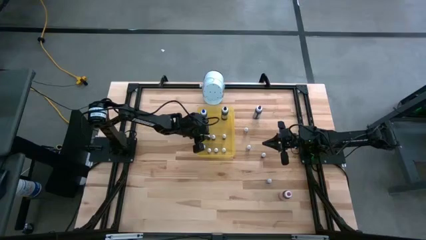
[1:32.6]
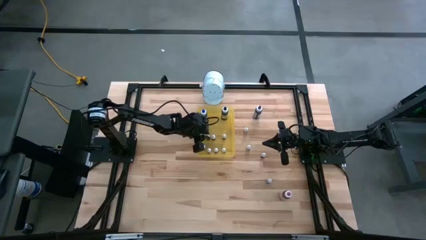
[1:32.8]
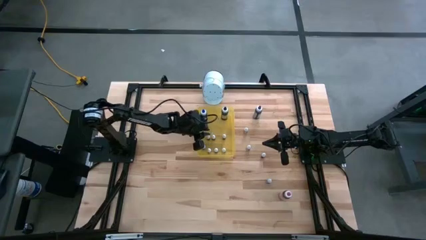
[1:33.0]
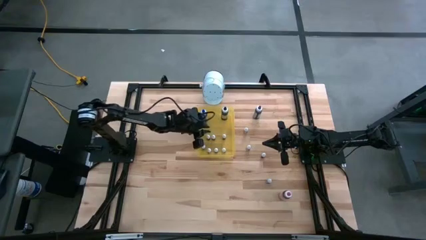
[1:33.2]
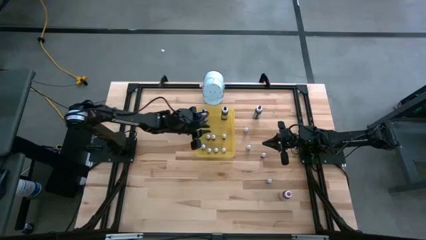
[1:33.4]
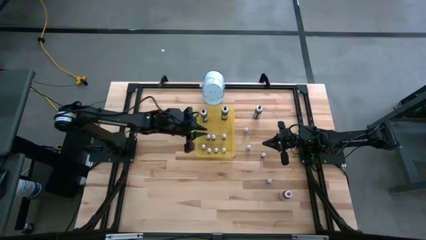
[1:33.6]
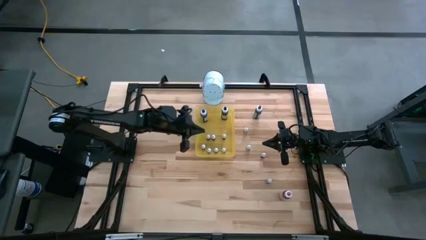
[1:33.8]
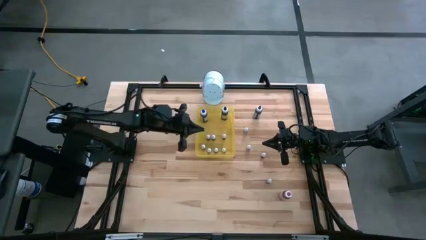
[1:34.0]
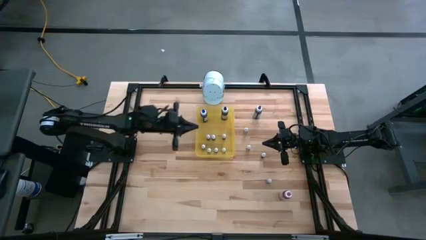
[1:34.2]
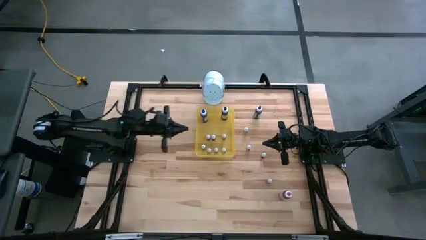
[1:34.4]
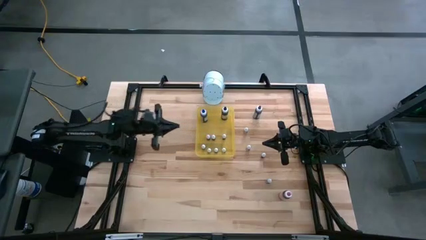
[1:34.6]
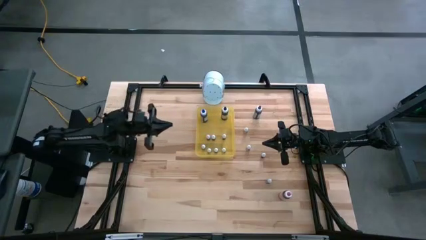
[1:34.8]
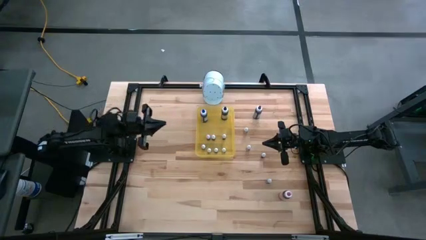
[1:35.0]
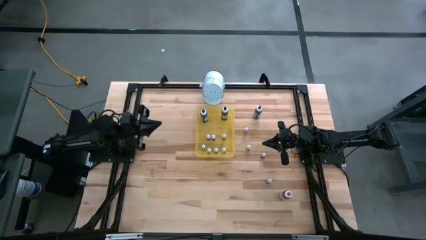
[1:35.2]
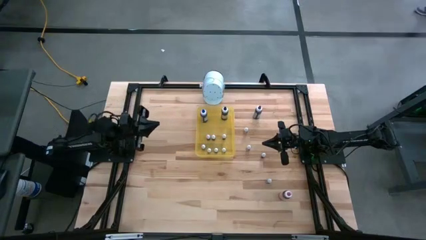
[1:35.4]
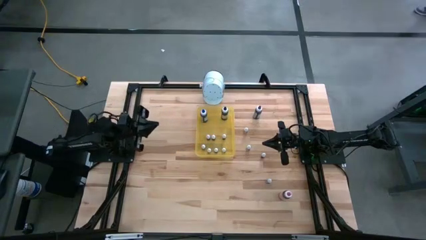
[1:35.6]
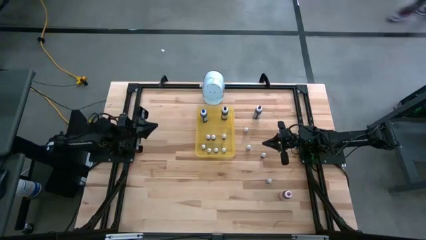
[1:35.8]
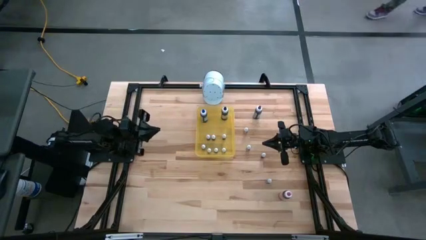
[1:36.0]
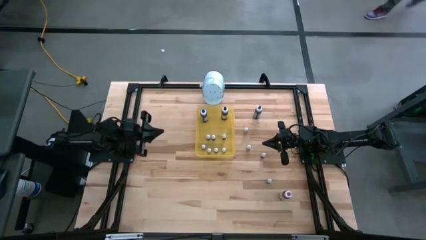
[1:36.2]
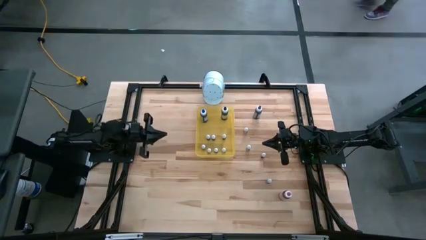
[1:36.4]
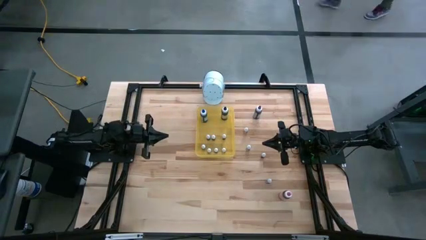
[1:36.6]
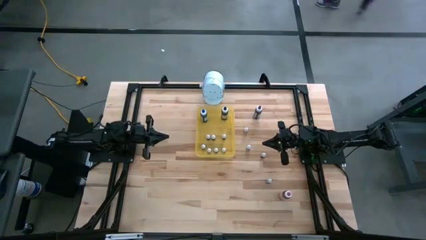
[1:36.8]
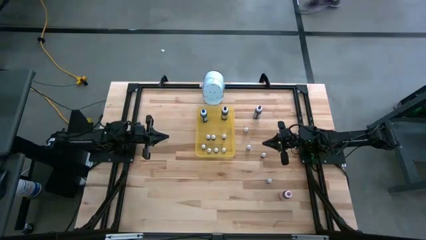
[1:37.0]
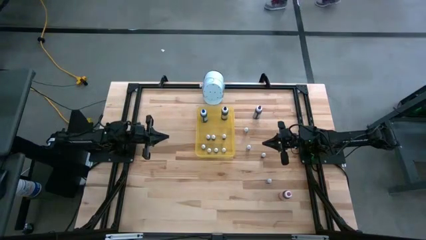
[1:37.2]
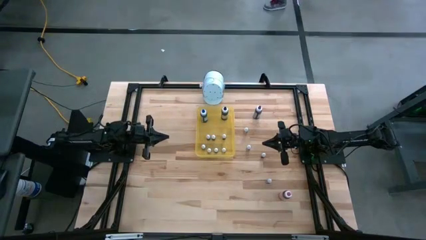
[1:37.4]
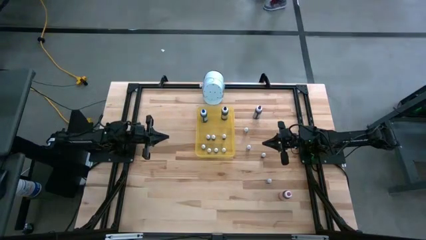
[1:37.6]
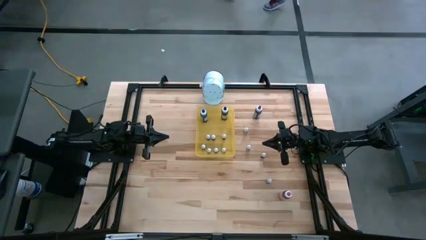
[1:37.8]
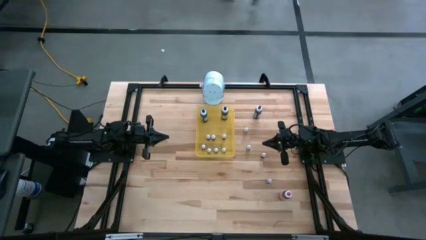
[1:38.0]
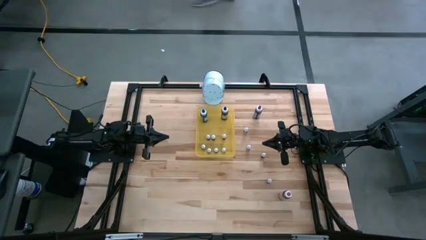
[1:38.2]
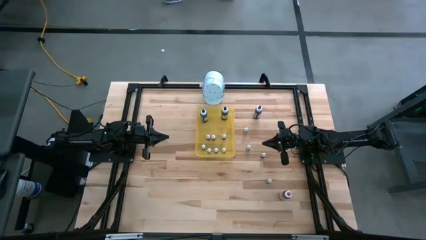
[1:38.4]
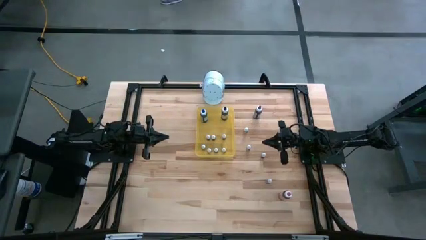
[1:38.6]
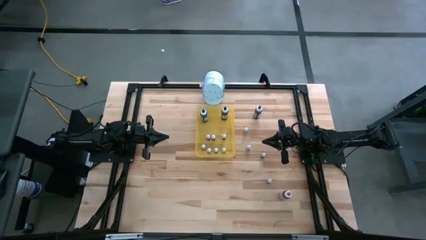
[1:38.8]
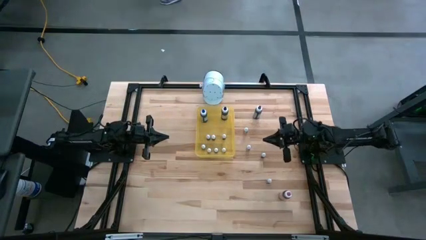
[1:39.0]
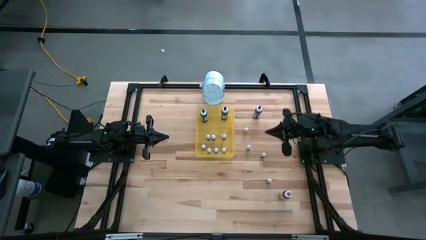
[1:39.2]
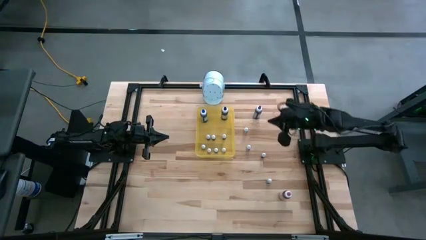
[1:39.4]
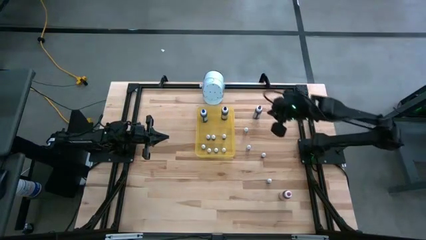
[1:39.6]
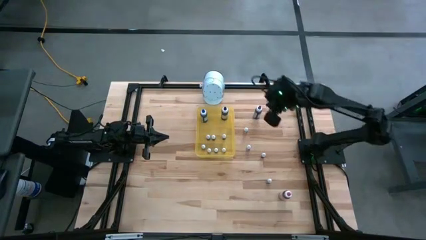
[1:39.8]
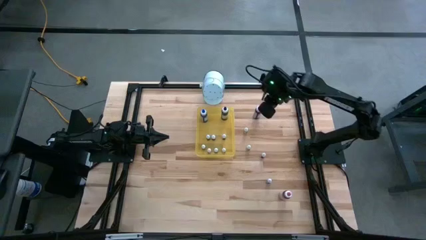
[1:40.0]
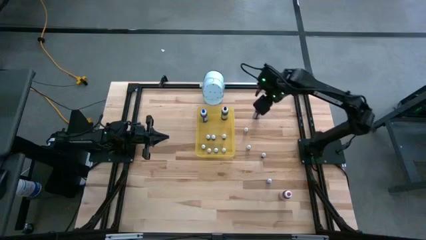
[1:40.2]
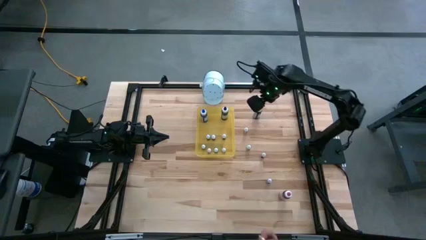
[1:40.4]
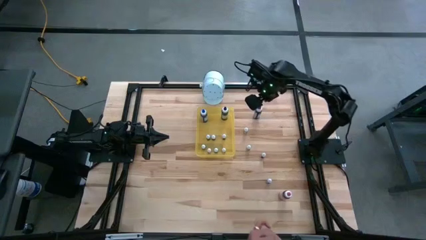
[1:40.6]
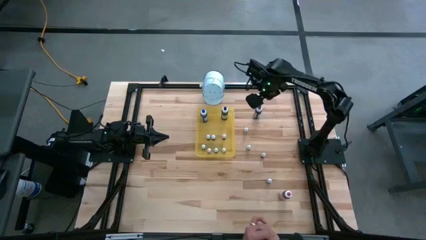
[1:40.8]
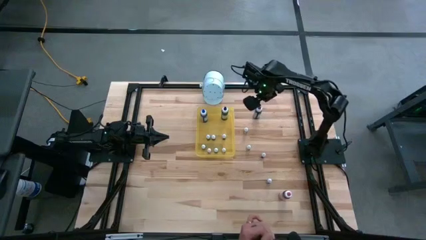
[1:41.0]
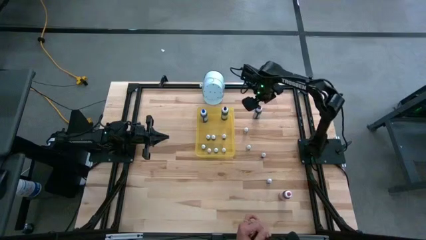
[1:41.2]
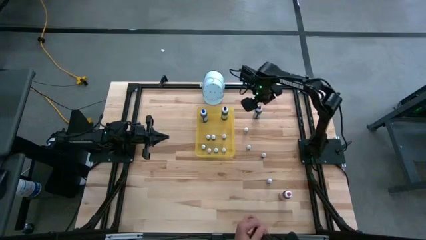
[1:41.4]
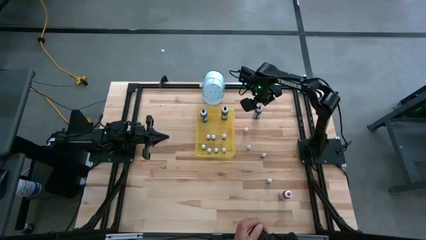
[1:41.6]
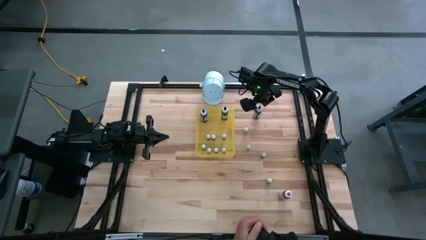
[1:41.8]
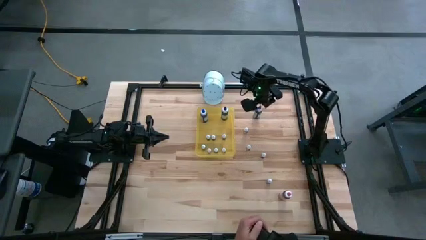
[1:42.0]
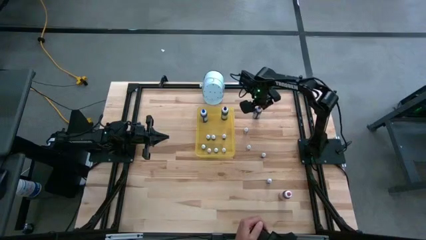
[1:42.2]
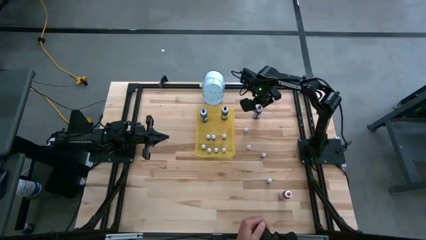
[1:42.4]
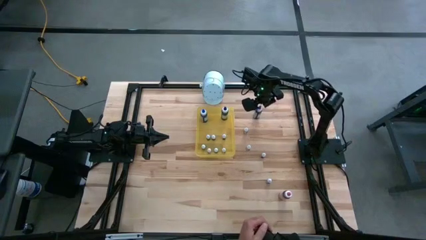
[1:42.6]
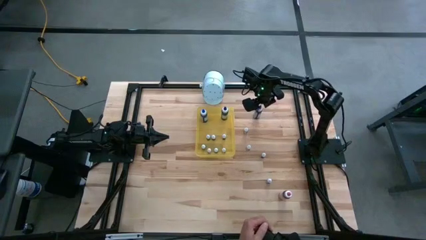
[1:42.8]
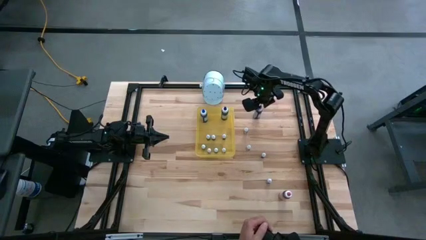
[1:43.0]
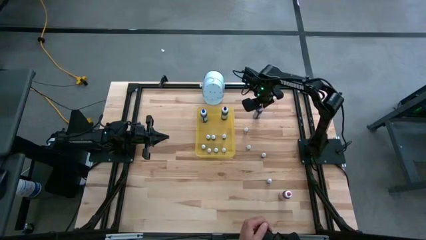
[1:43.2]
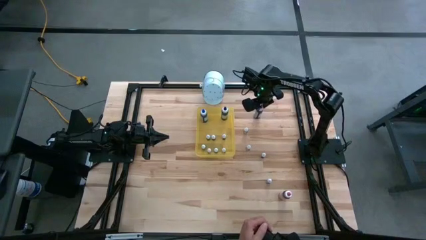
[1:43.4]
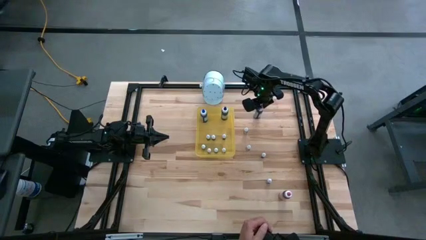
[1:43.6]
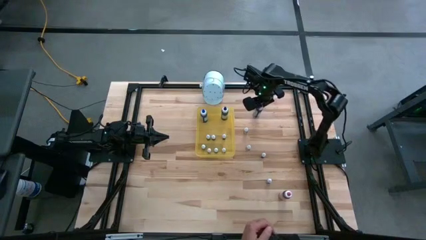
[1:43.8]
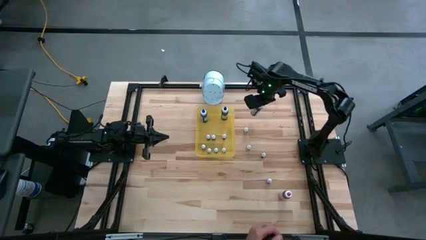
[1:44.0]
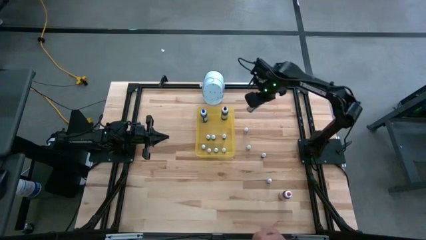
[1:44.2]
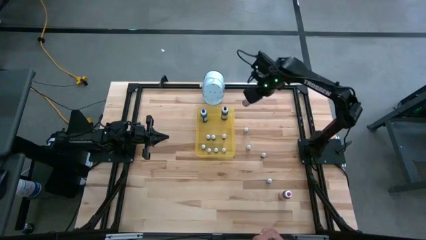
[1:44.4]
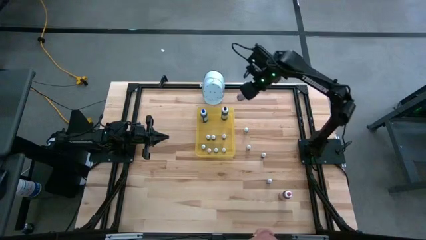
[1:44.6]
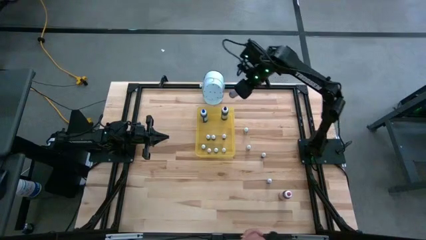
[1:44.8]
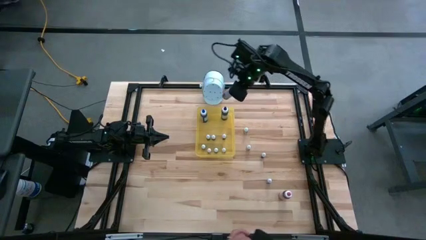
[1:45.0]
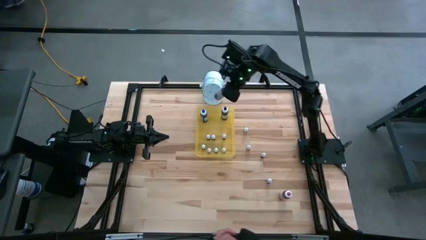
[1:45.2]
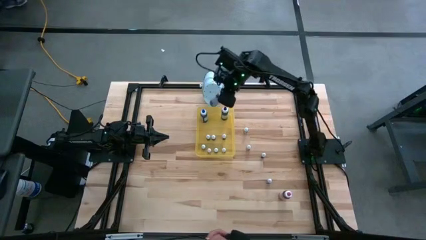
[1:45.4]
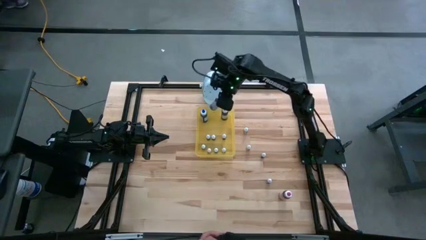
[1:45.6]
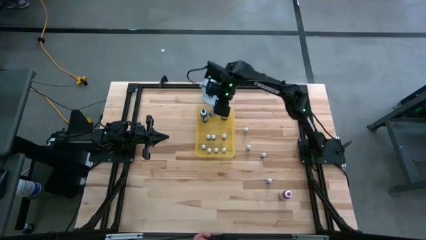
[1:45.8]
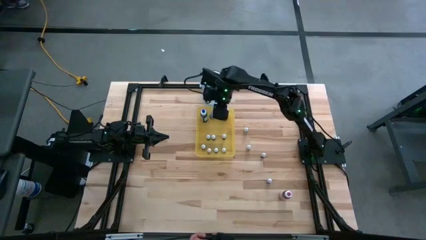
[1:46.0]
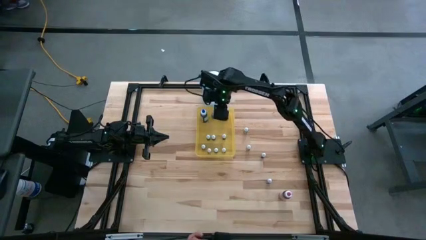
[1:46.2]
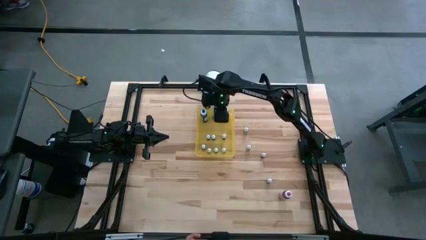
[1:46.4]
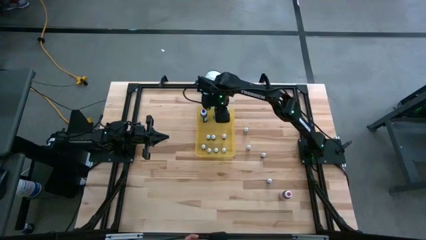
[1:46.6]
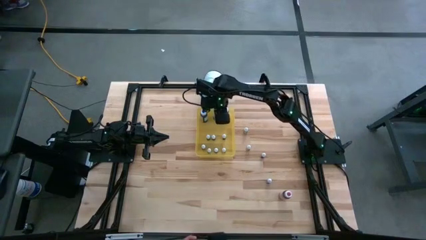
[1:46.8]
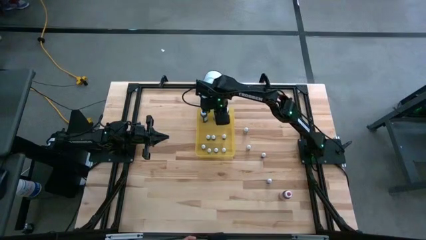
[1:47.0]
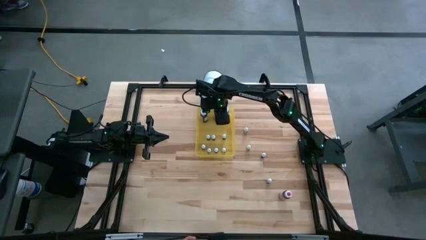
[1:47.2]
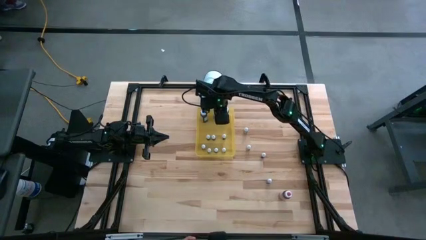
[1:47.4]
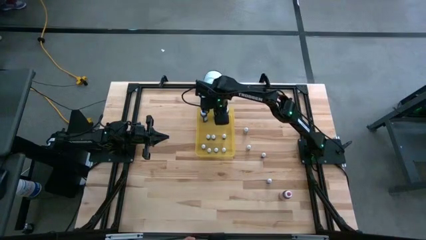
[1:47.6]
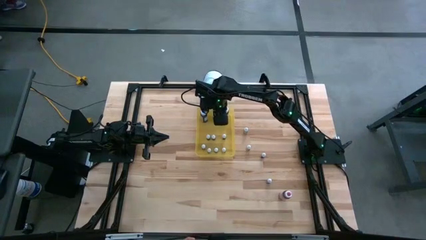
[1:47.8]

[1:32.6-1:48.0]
Task: Pick & Place food coloring
Put the big purple food coloring bottle in the yellow transparent bin
